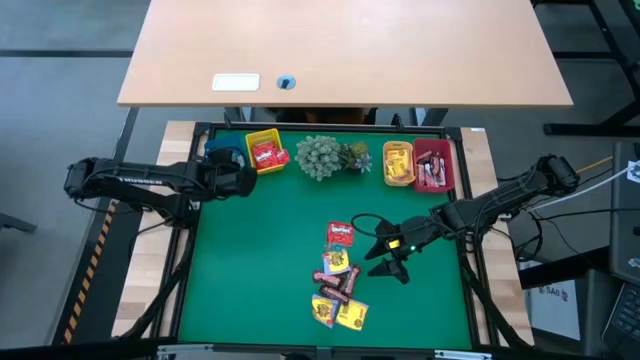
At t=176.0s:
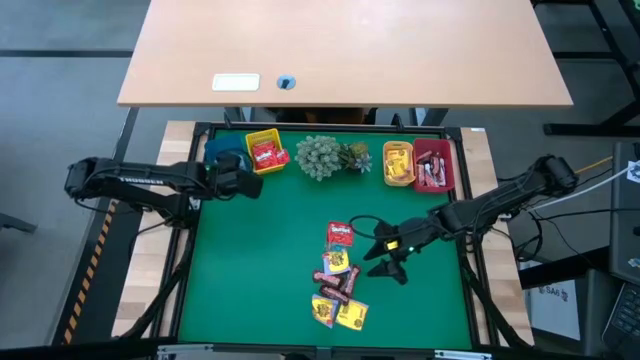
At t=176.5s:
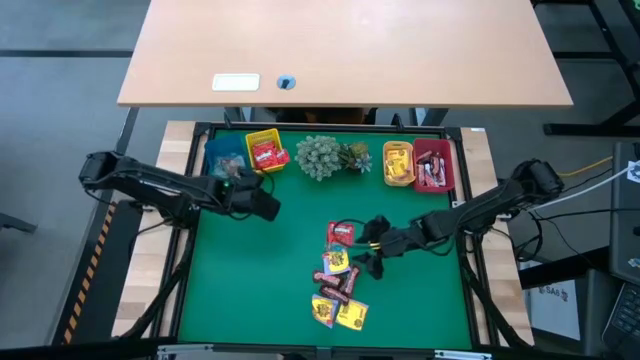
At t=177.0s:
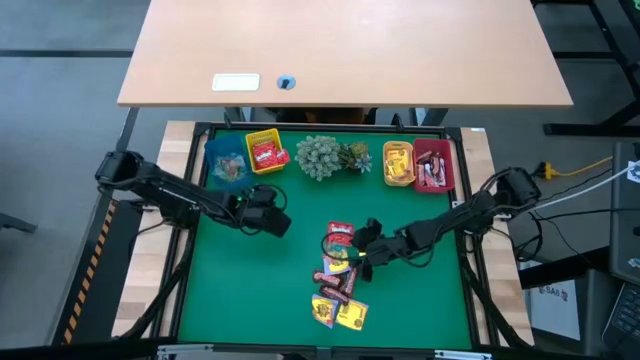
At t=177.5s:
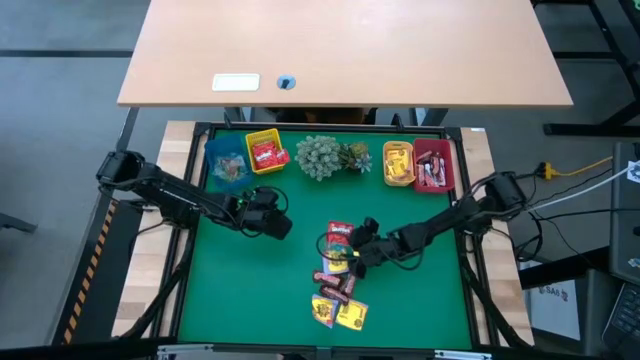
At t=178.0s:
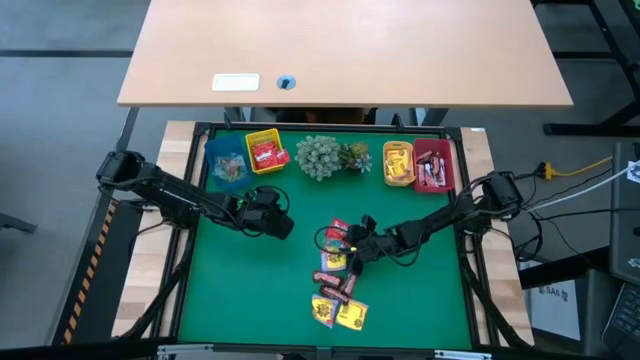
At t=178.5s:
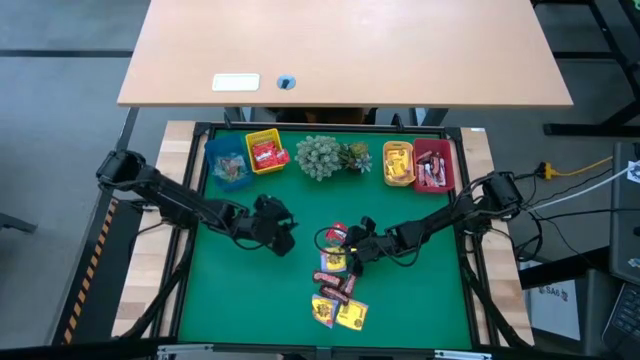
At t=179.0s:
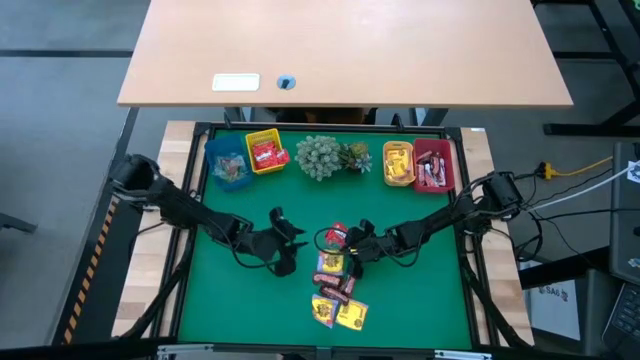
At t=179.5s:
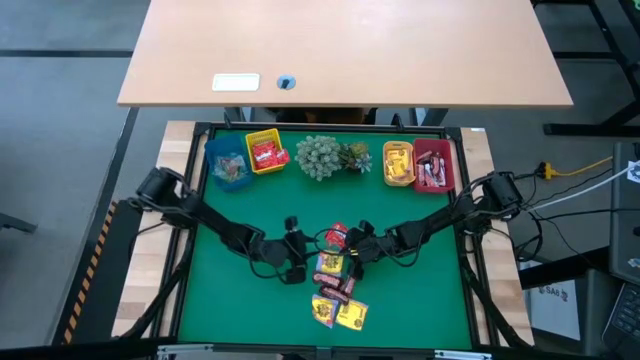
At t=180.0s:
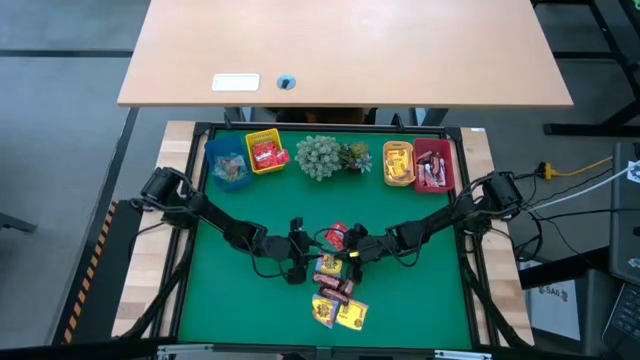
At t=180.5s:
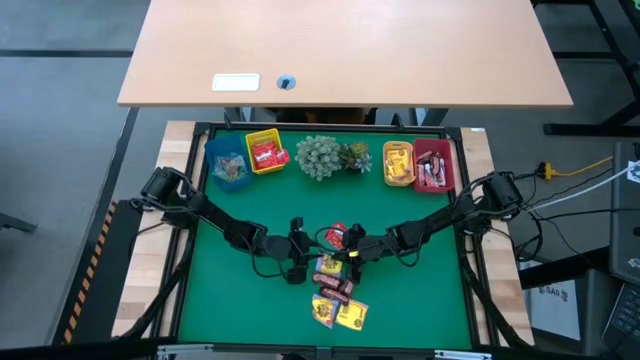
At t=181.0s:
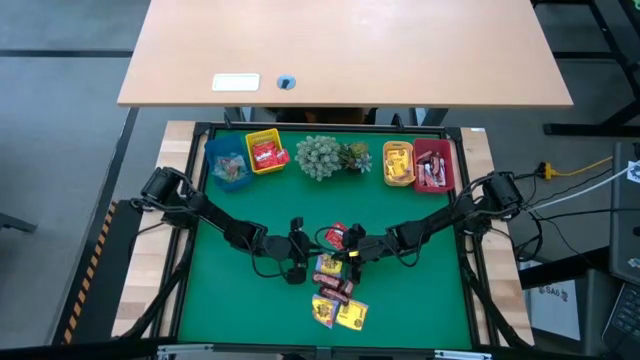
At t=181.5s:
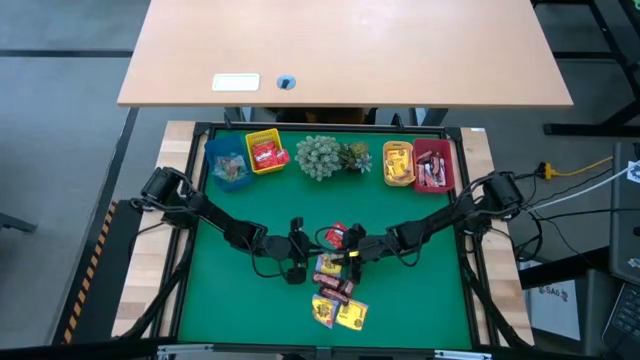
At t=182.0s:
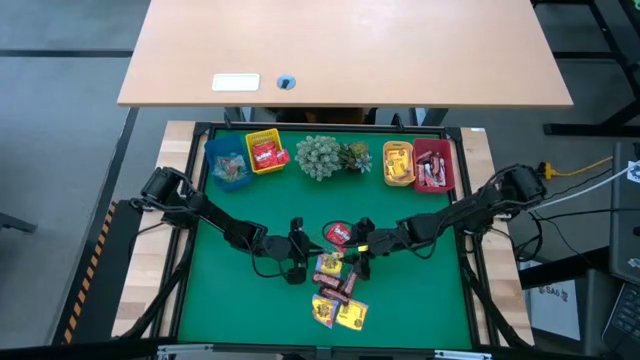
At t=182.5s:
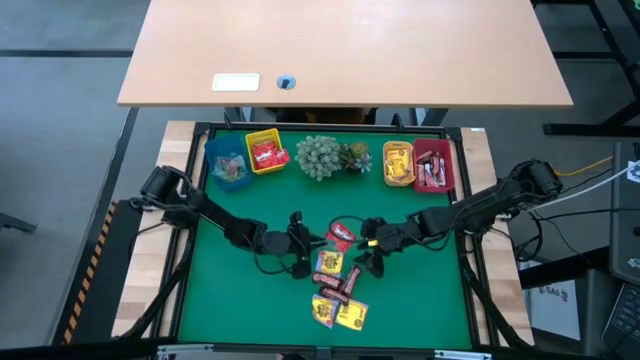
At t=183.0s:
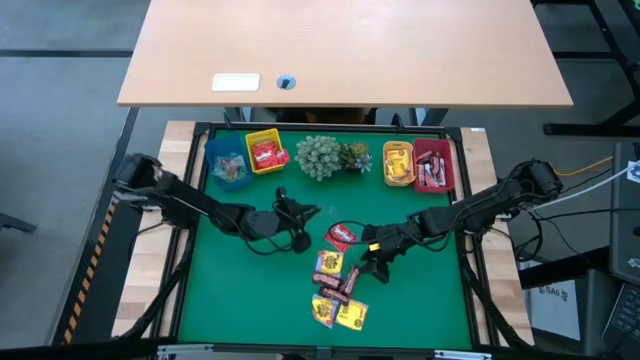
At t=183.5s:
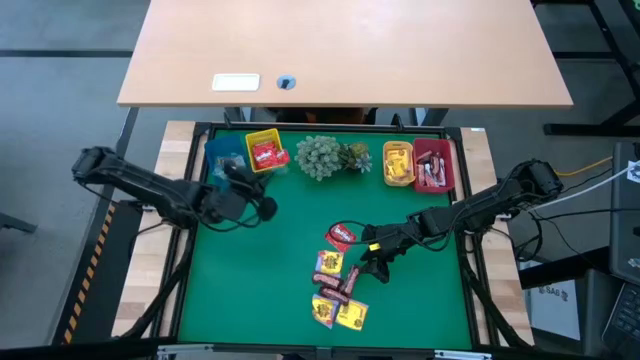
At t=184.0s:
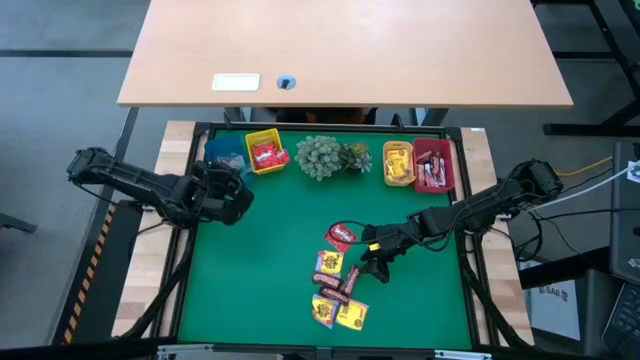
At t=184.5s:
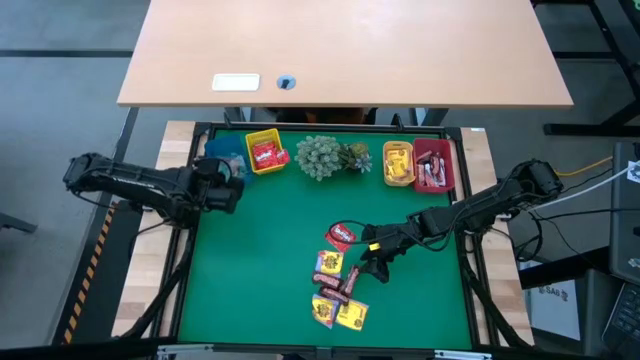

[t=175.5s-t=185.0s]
Task: Sort candy
Put the blue gummy into the blue bin

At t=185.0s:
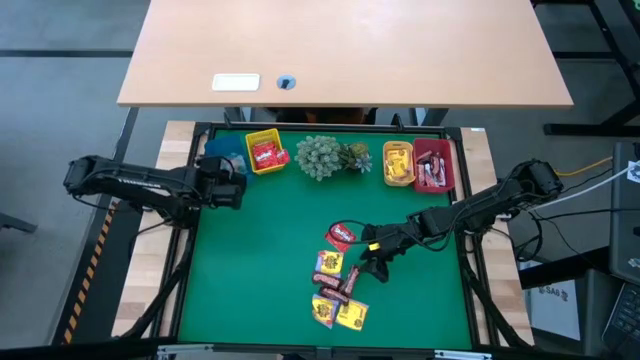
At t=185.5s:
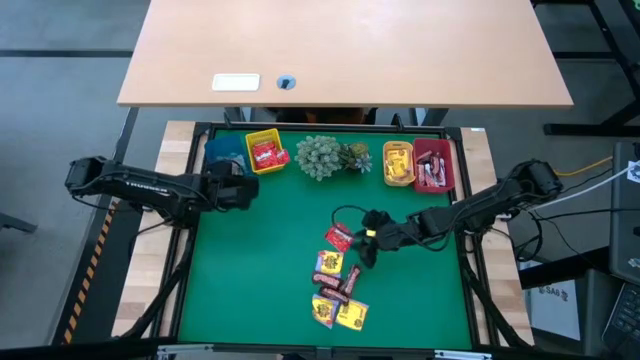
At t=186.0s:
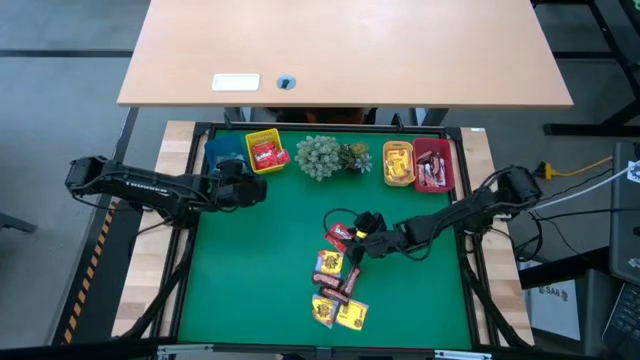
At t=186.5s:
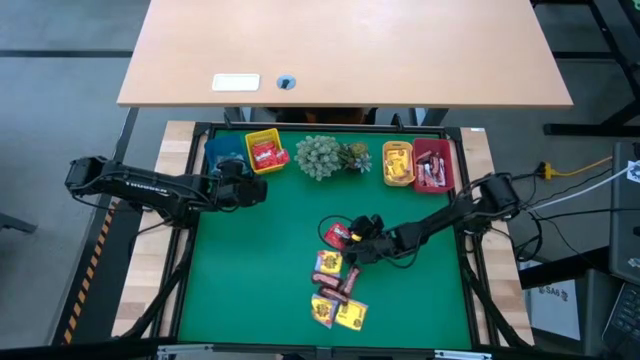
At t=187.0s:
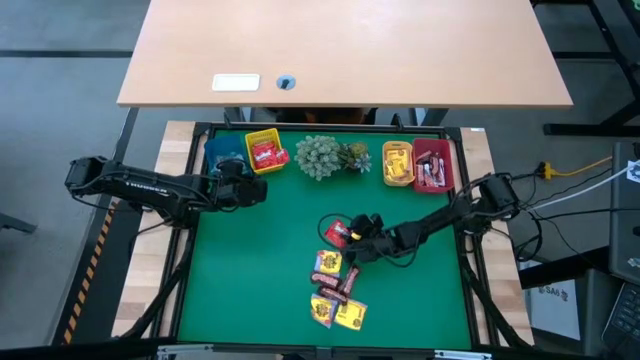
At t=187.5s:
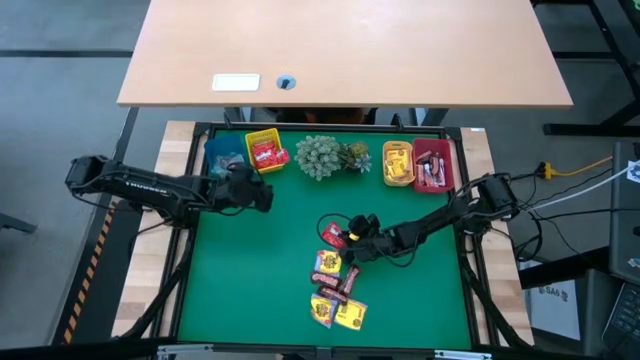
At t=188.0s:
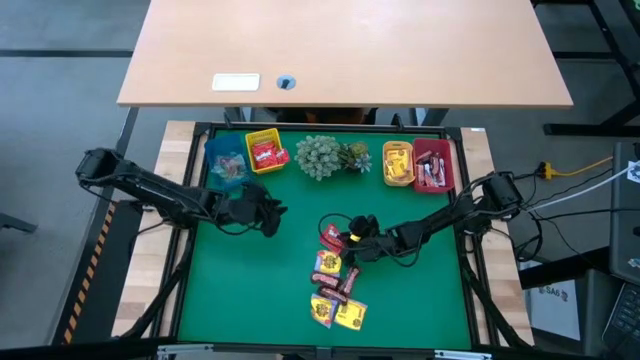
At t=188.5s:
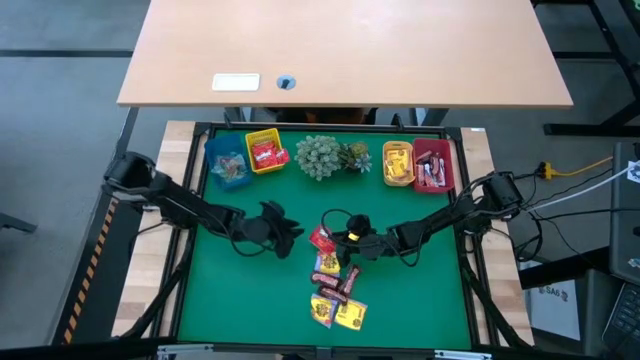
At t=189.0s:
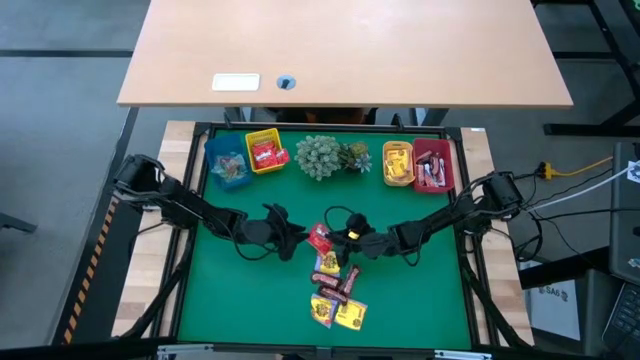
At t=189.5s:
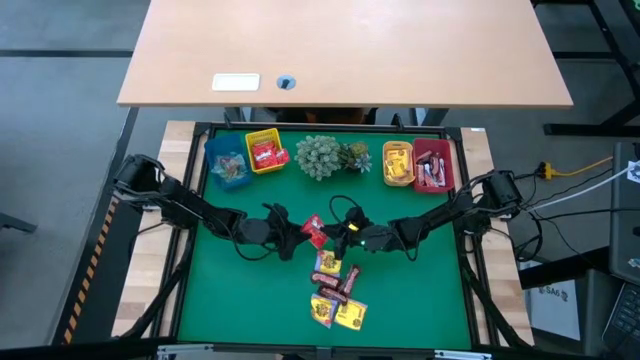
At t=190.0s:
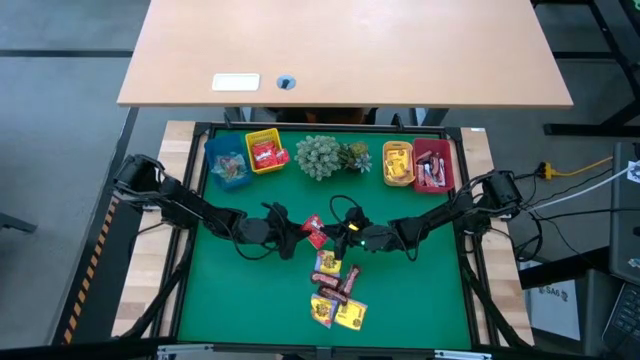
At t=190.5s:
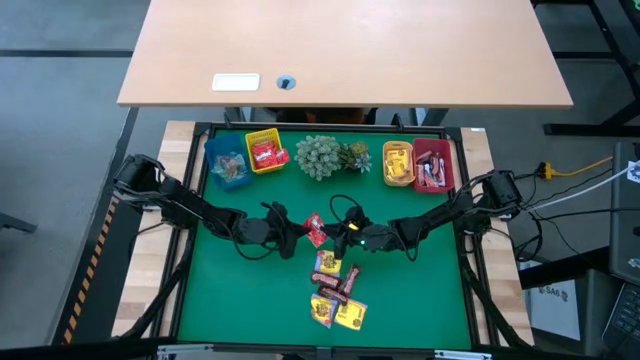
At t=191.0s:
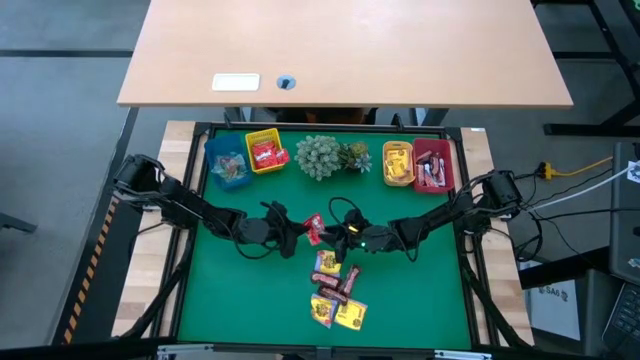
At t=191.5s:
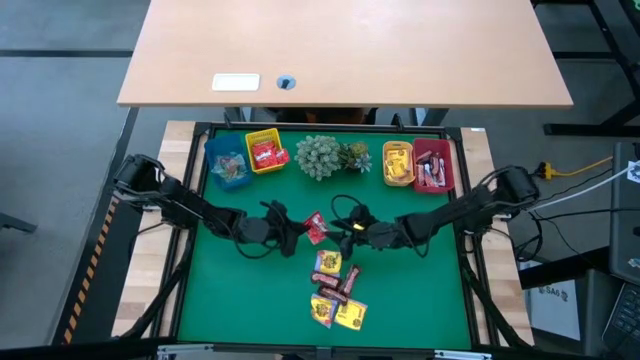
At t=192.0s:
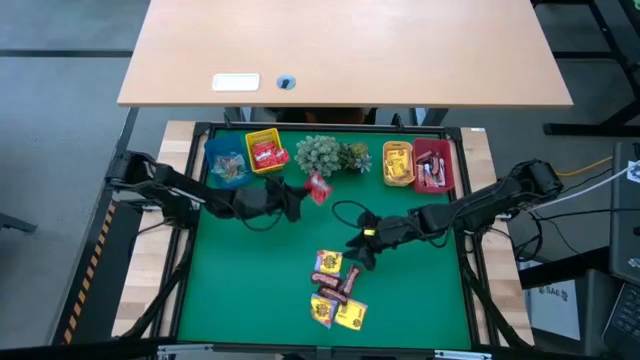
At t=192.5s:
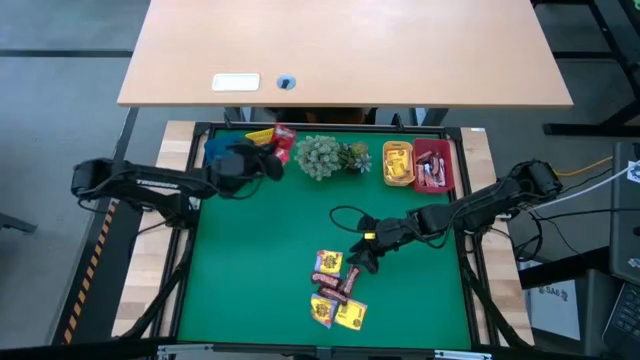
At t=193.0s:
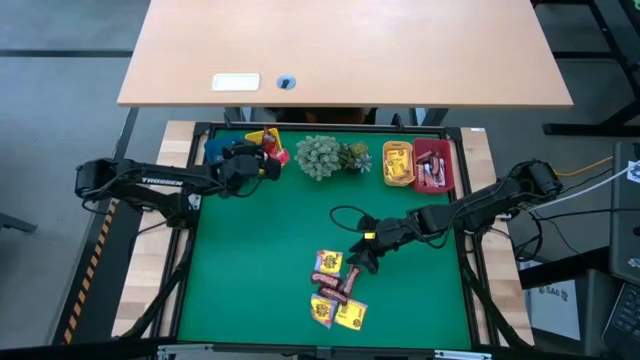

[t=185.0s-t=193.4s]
Put the red candy into the yellow bin

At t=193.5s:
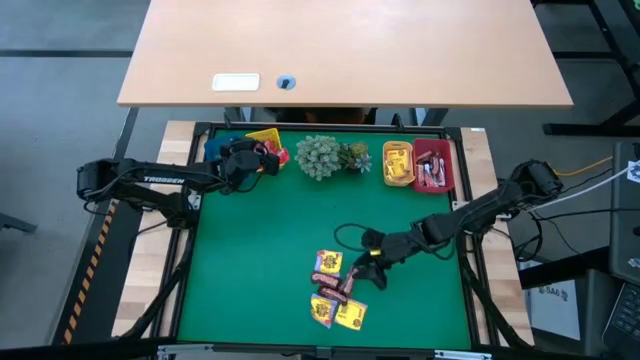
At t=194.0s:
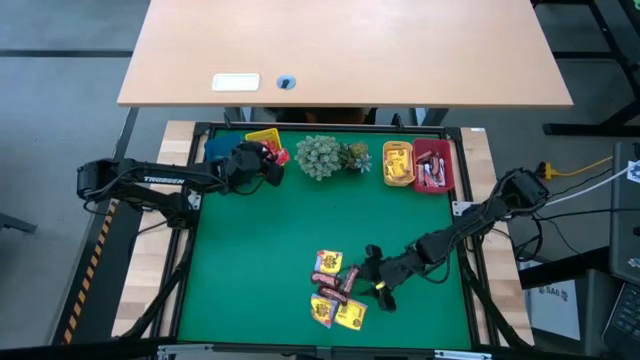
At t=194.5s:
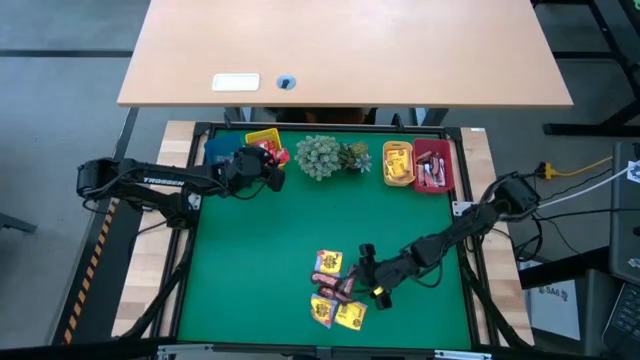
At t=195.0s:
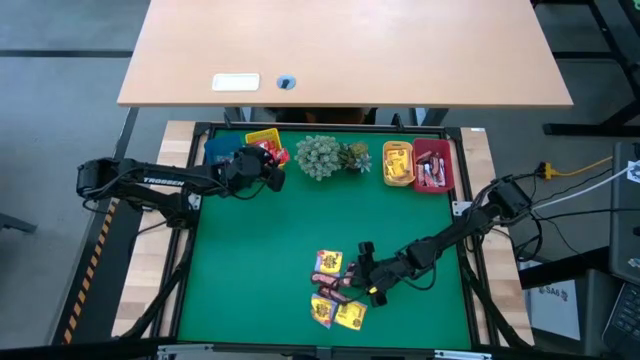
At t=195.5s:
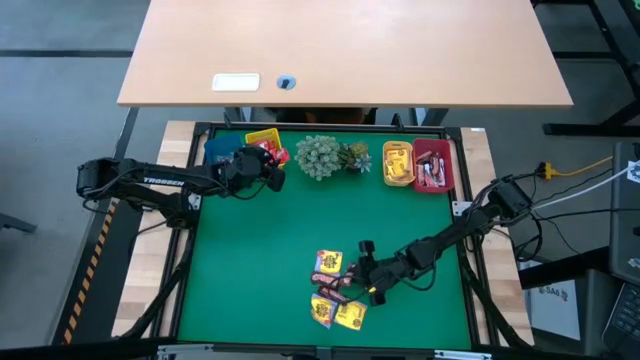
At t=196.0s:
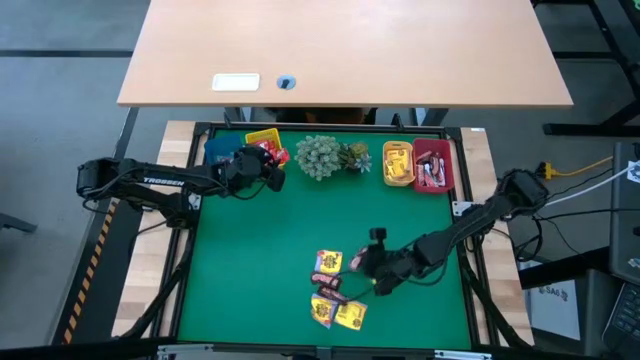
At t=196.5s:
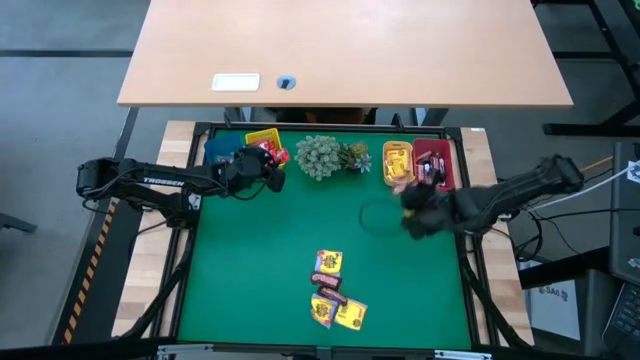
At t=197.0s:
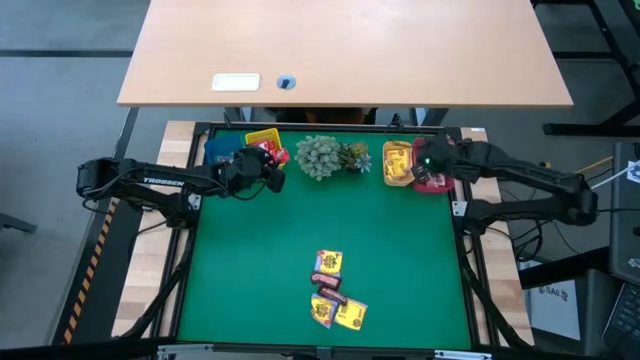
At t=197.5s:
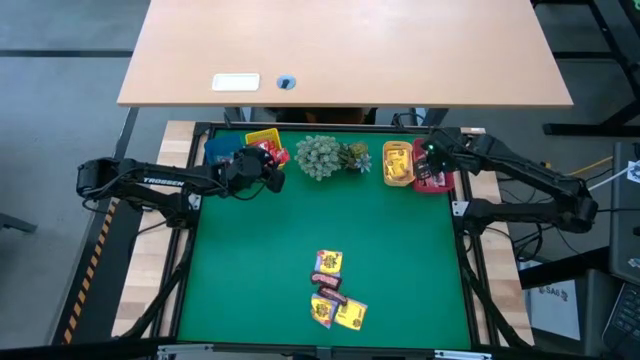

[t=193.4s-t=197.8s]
Put the brown chocolate into the red bin
